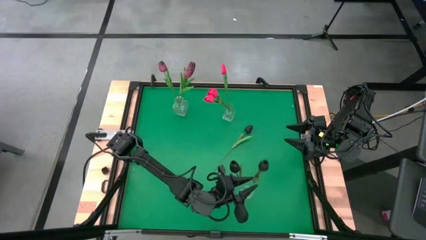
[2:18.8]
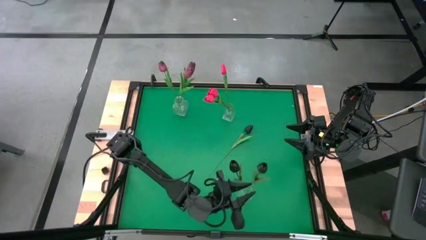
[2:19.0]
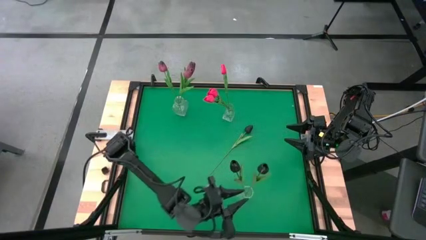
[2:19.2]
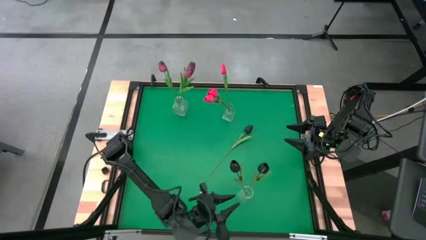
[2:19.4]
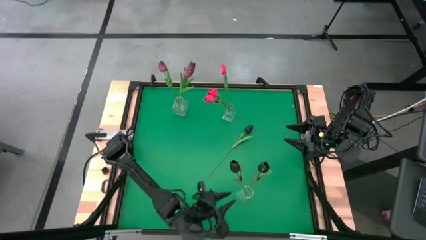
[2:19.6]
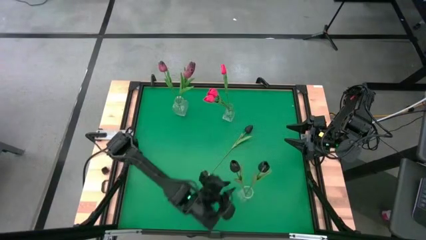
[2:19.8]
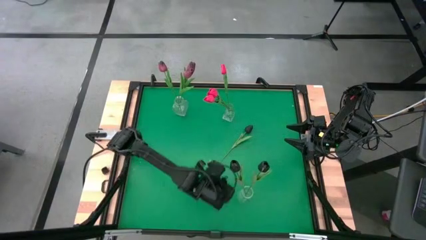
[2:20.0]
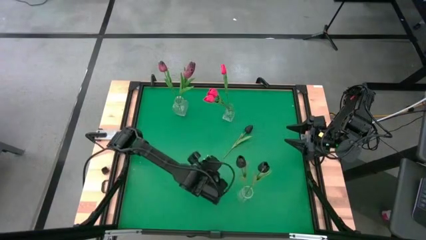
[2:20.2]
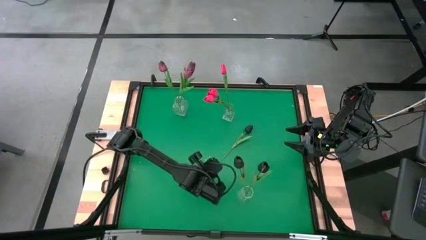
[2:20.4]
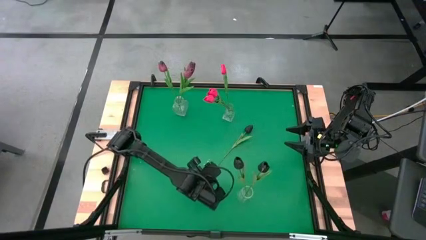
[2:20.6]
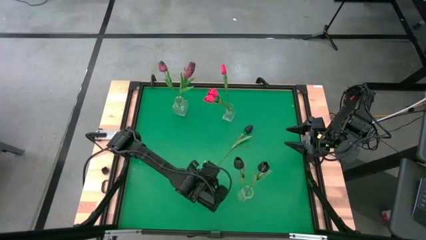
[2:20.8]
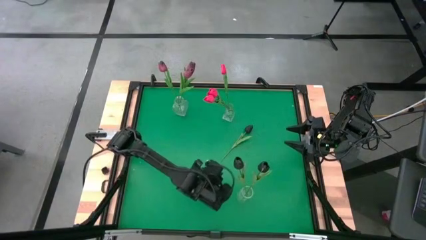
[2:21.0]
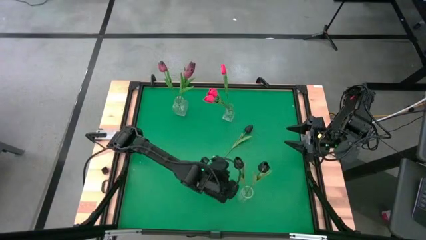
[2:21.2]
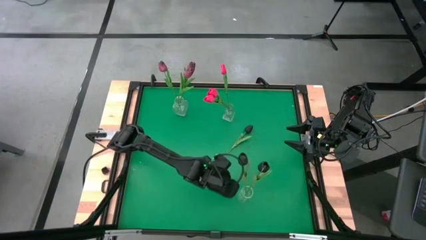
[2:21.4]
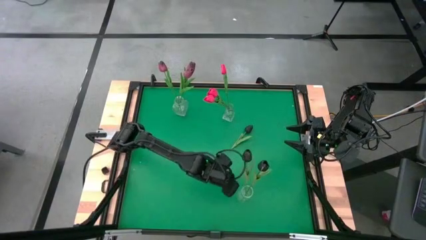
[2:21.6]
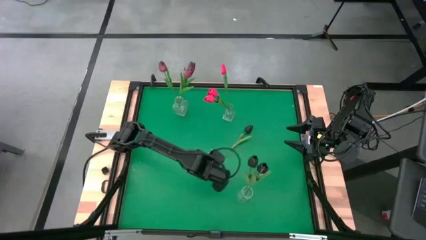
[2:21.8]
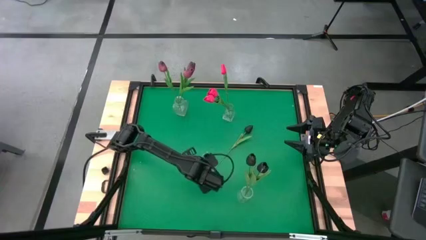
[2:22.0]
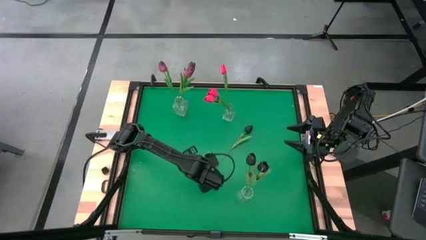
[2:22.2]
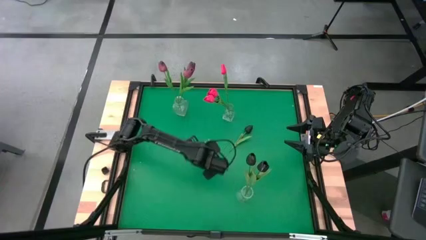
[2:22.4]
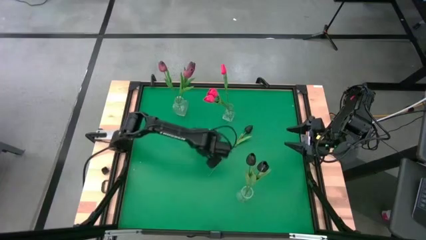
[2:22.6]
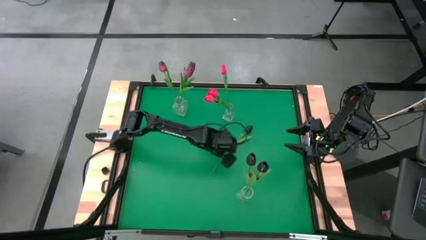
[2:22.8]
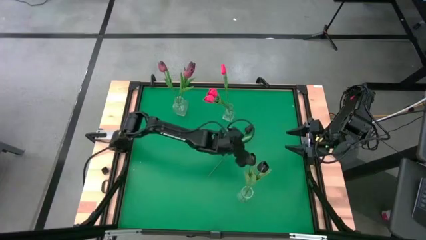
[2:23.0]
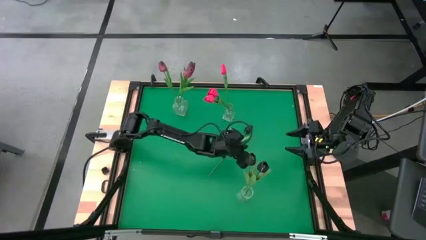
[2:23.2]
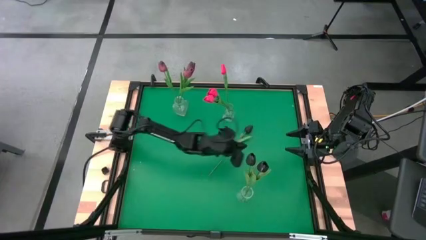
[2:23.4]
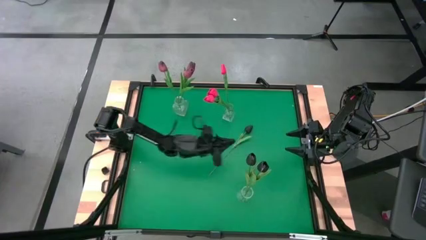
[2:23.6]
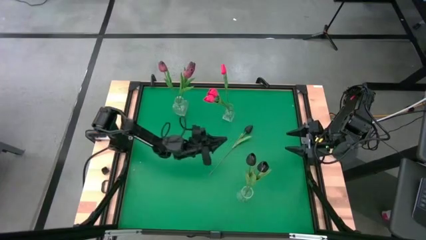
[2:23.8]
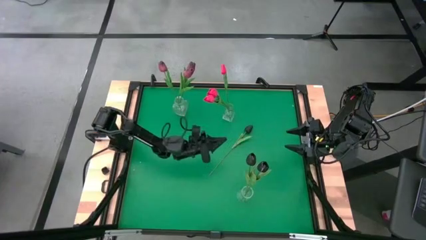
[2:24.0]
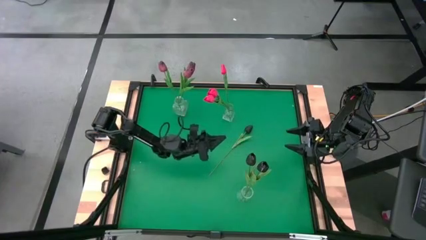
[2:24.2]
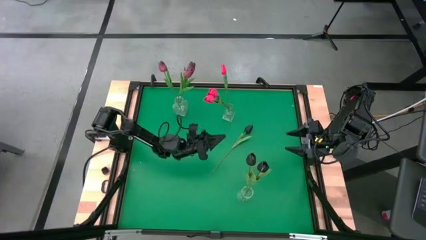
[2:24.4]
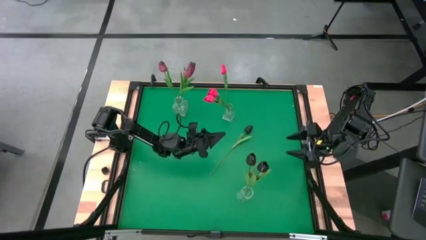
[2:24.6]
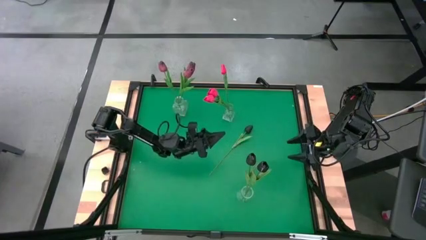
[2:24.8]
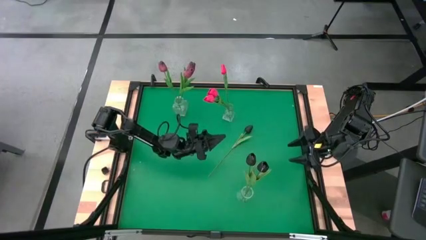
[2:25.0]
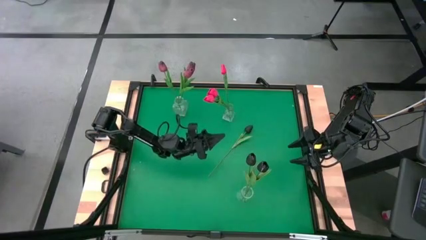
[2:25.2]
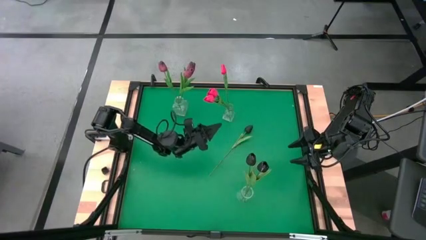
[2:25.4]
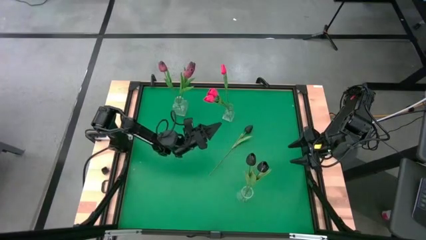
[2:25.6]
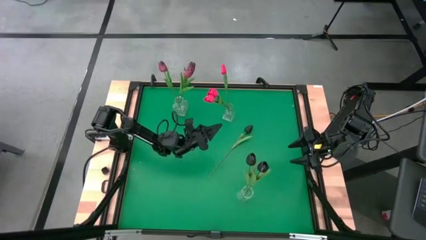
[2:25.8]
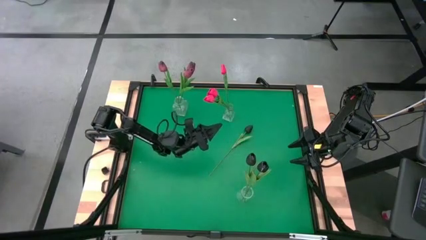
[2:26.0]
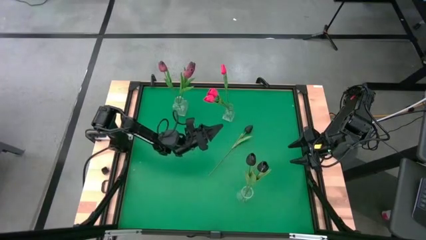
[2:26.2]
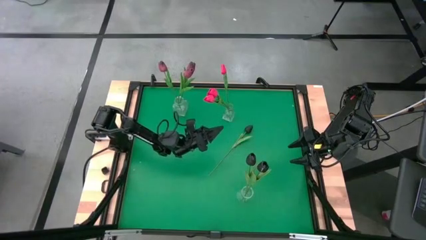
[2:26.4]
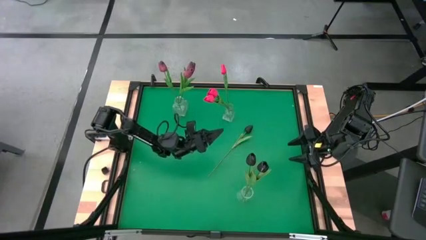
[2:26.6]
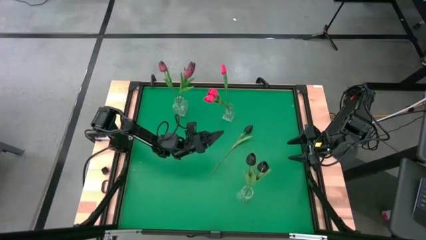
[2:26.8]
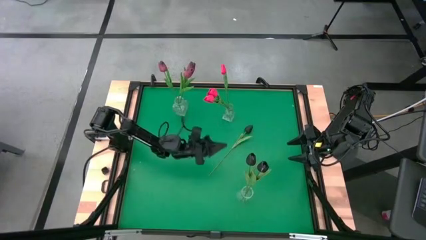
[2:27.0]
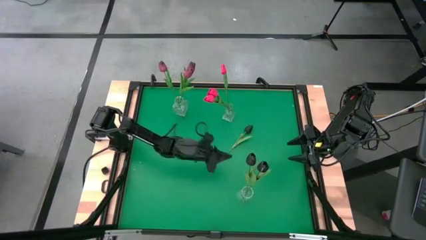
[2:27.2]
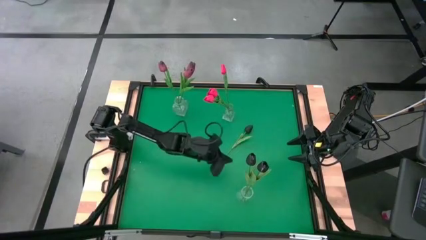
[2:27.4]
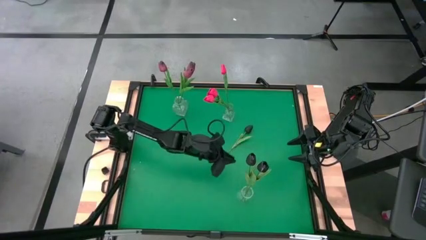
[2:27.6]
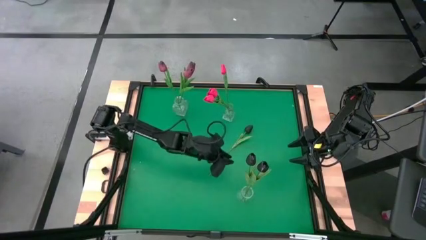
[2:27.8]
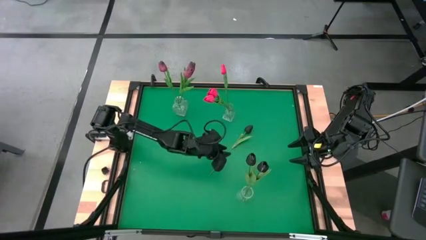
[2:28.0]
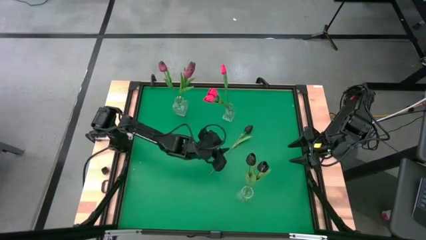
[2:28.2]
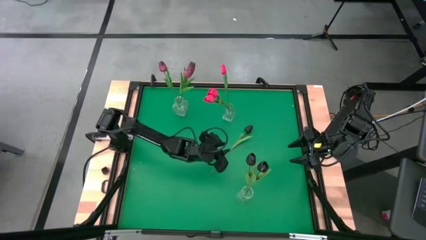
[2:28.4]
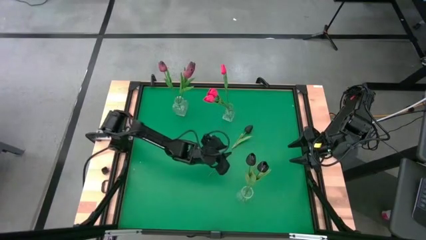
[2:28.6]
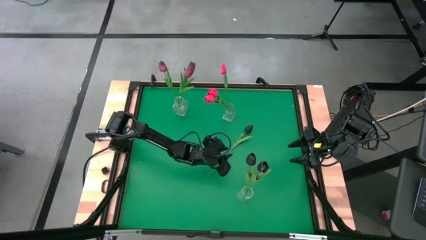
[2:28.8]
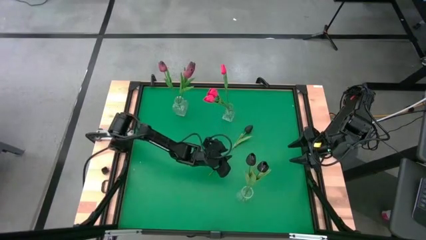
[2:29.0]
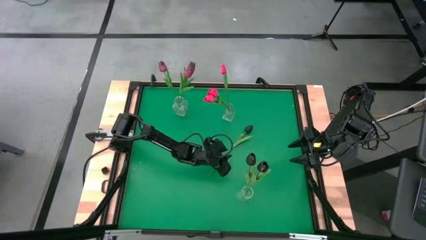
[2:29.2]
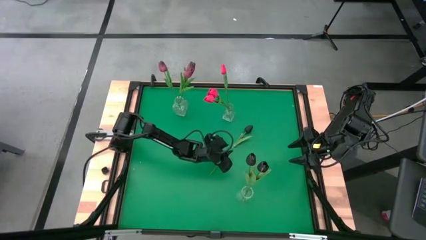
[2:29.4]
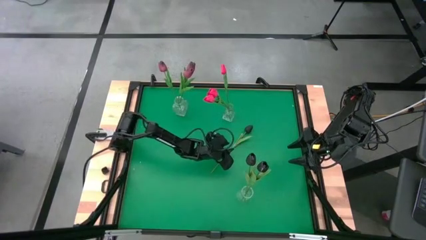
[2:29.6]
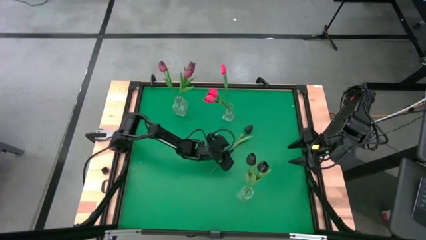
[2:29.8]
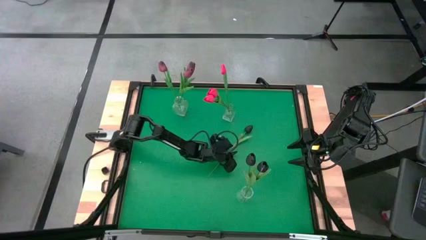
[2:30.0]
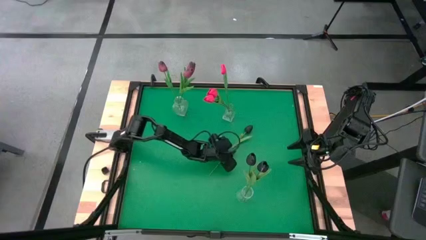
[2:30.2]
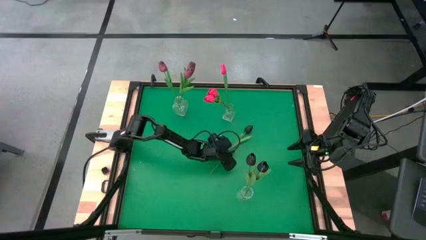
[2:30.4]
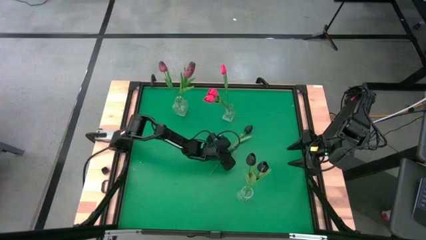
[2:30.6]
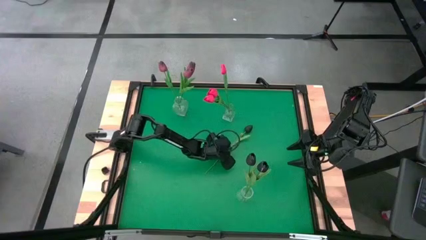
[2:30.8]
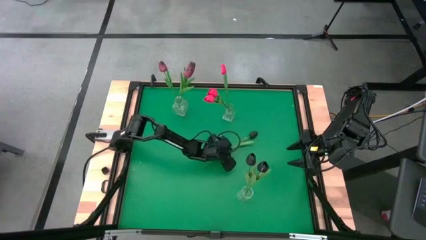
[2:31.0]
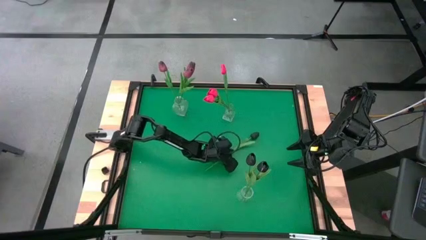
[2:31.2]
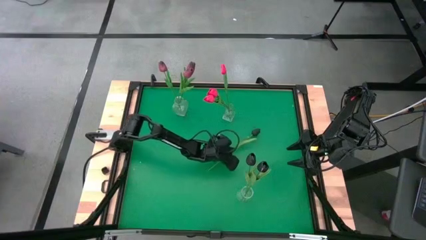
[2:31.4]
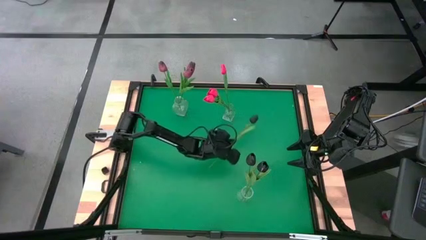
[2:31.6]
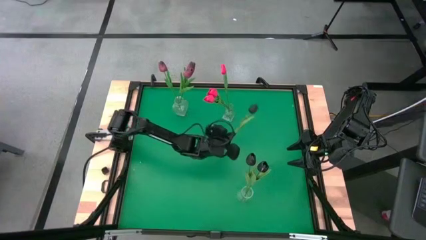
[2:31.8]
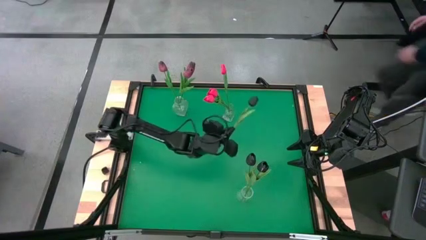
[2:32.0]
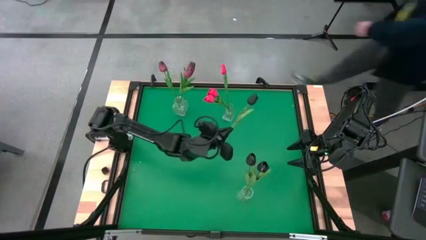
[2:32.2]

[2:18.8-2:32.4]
Task: Sort flowers into vase by color
Put the black tulip into the bottom transparent vase

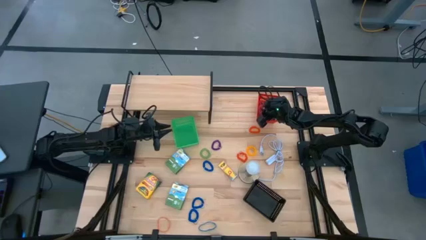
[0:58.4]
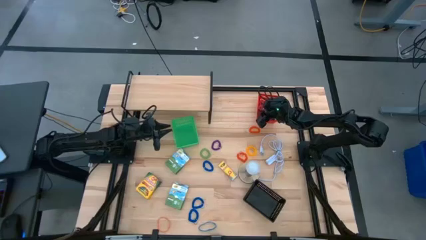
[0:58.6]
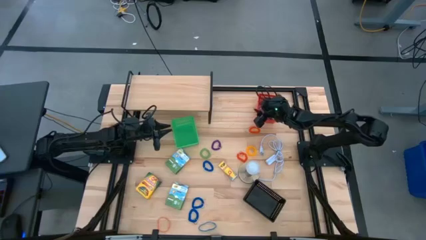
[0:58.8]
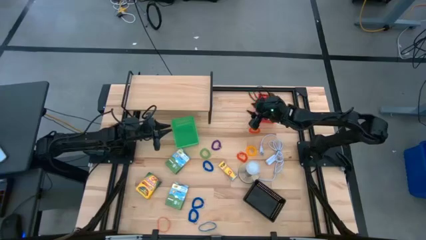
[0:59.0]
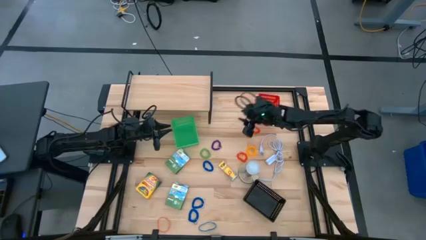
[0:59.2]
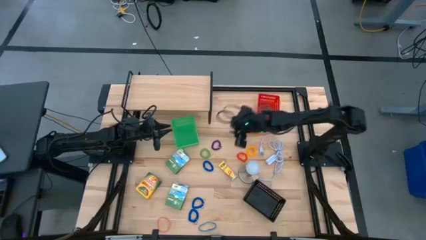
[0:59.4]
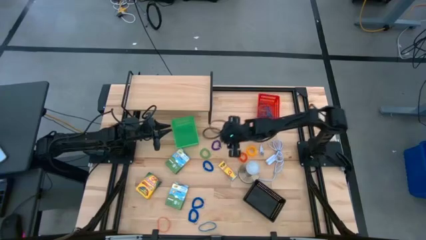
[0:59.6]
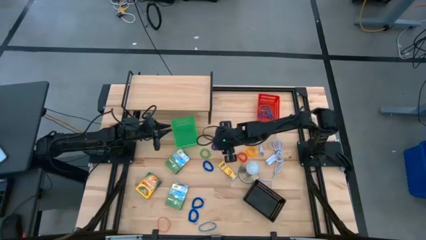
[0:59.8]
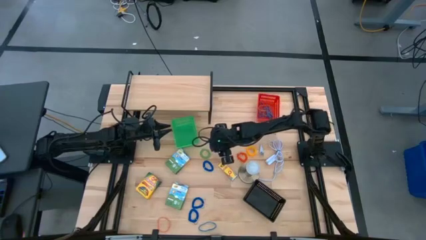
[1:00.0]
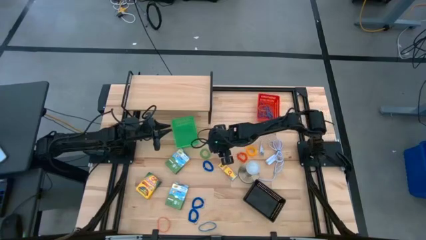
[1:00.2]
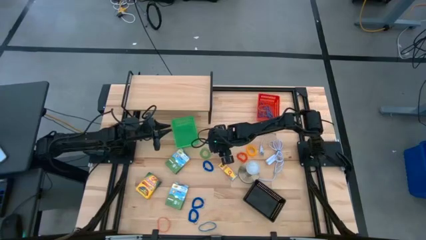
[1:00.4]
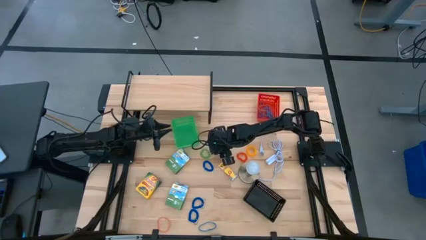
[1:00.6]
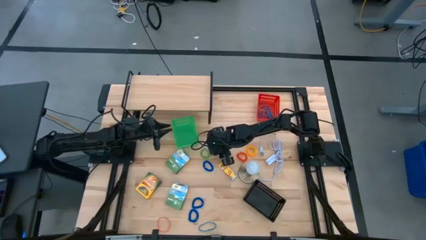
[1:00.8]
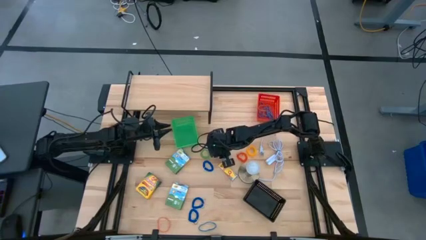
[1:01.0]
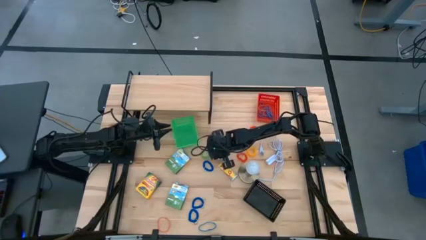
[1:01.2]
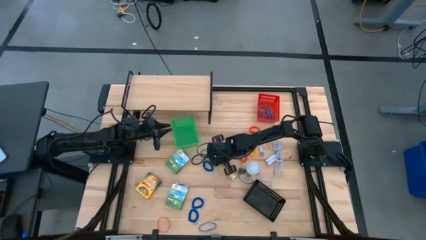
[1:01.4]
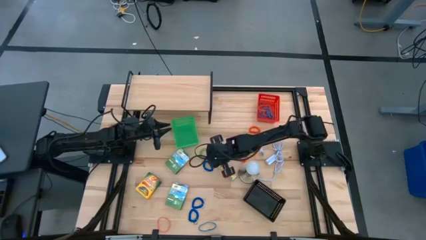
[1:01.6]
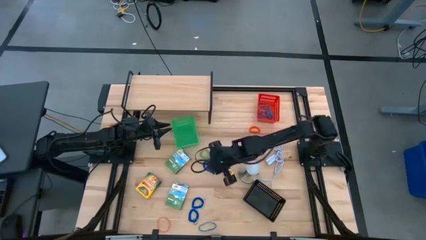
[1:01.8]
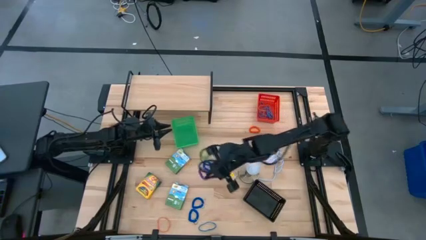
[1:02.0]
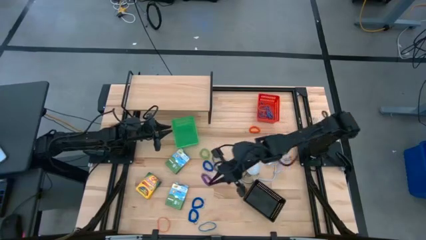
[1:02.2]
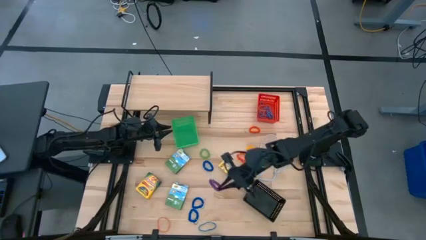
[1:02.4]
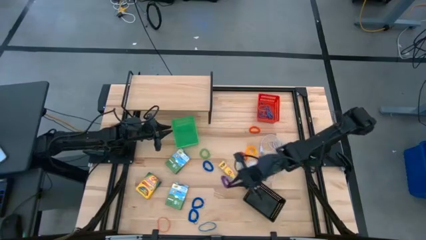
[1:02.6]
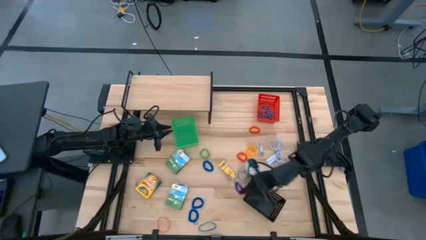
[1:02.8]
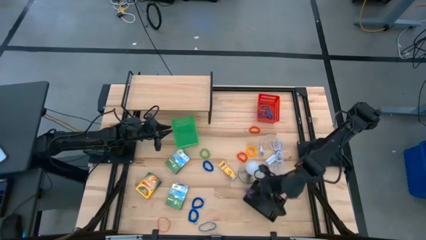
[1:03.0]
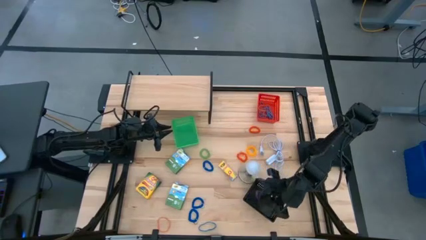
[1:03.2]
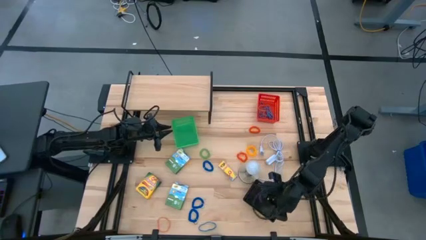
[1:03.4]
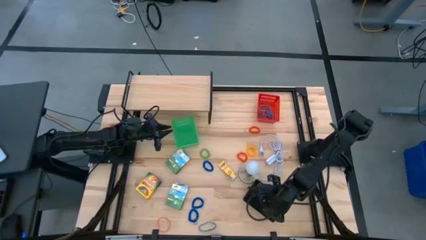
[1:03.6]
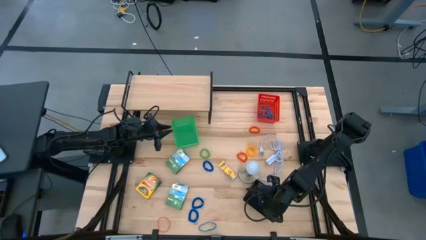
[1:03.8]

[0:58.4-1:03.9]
Task: Pick & Place Office Desk Supplies
Put the violet spring keychain into the black basket
